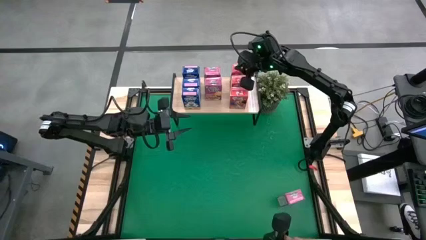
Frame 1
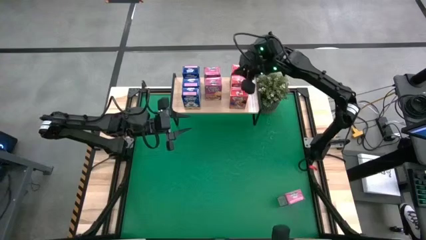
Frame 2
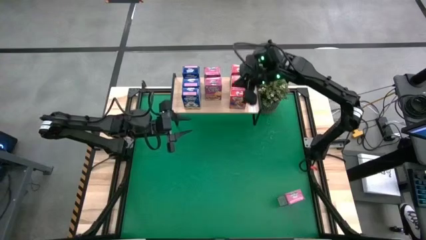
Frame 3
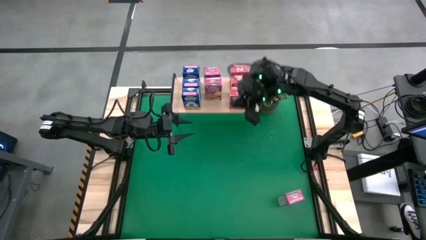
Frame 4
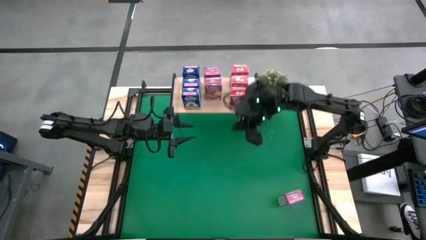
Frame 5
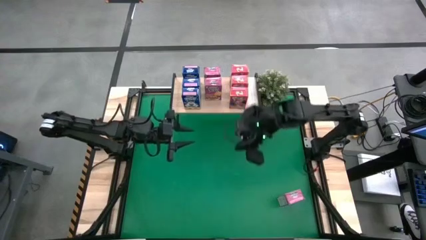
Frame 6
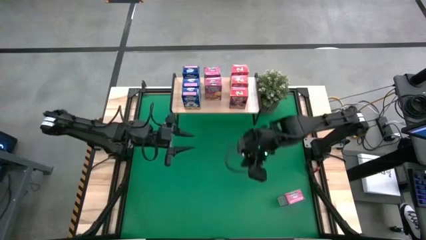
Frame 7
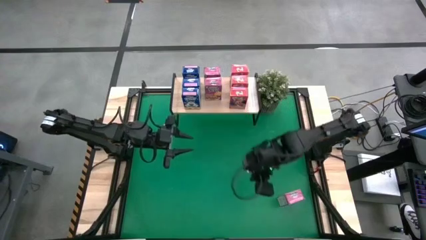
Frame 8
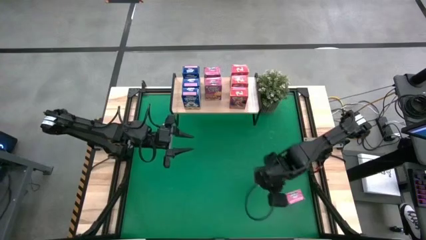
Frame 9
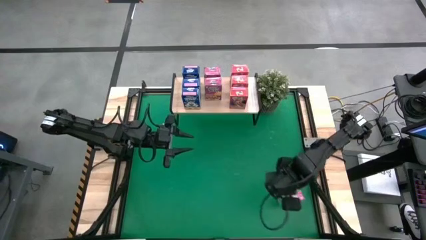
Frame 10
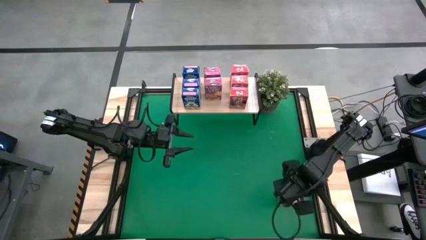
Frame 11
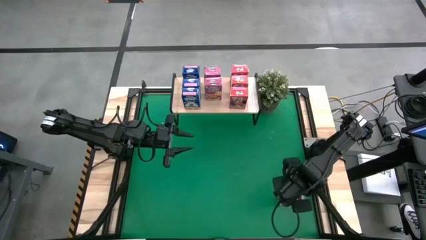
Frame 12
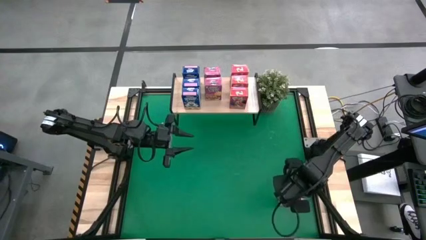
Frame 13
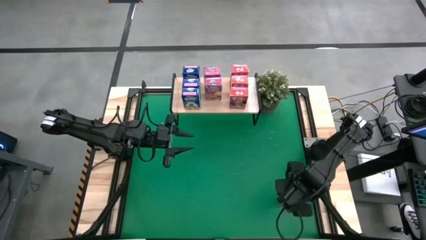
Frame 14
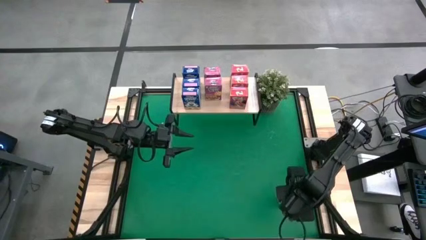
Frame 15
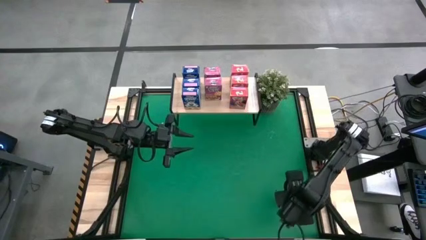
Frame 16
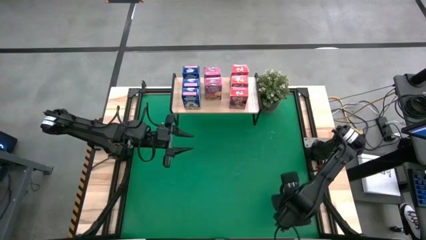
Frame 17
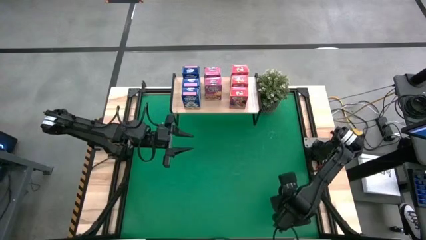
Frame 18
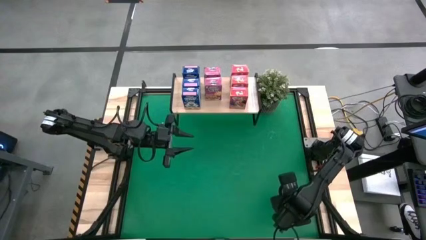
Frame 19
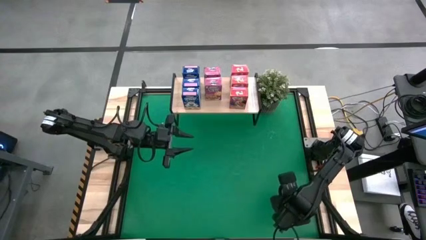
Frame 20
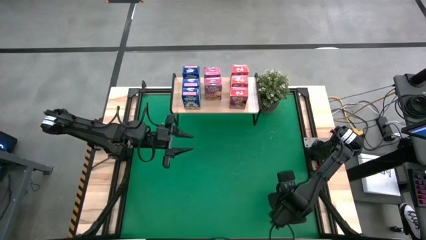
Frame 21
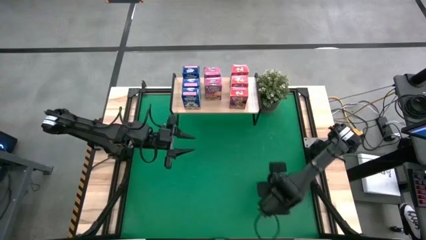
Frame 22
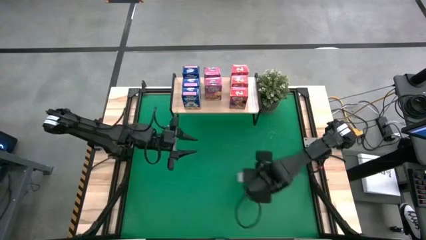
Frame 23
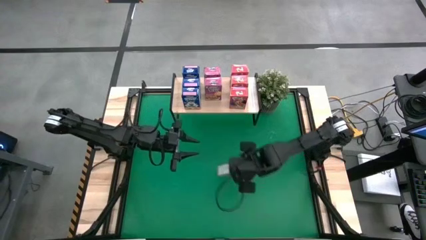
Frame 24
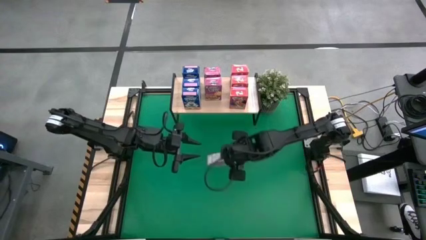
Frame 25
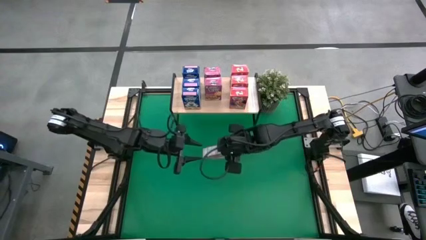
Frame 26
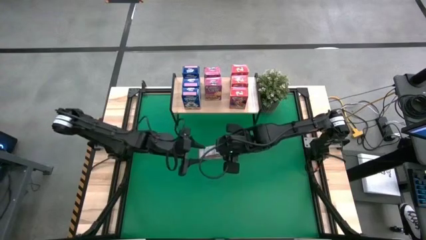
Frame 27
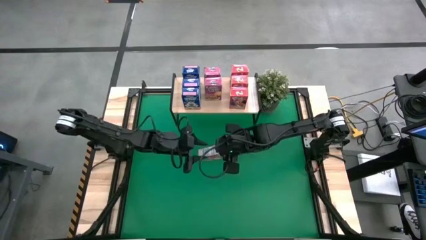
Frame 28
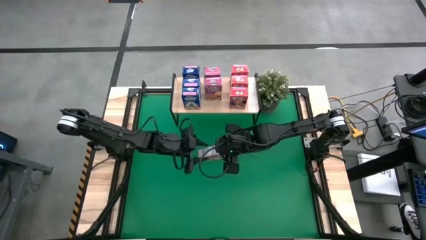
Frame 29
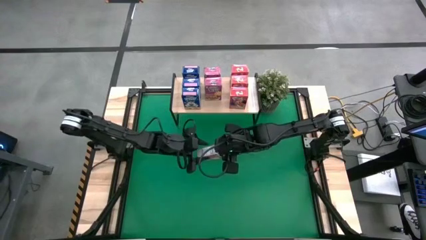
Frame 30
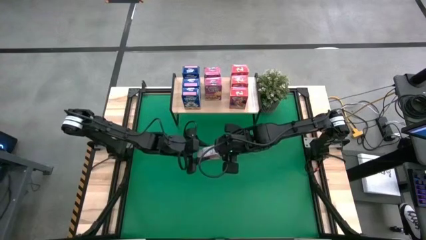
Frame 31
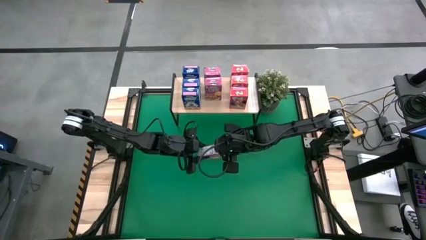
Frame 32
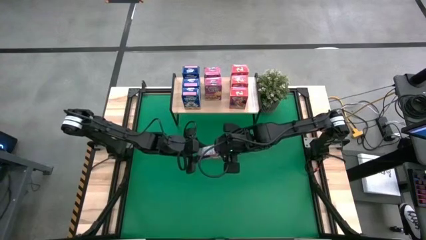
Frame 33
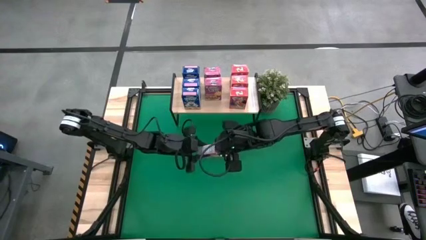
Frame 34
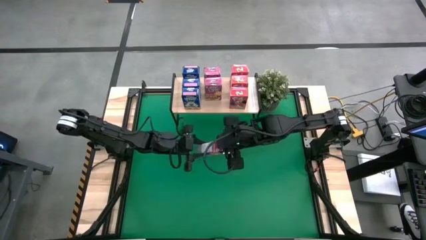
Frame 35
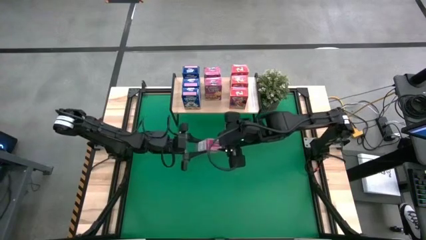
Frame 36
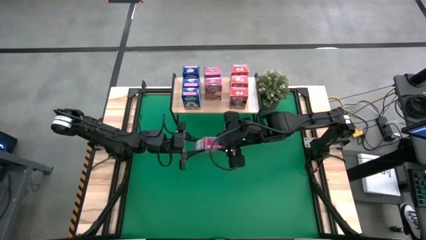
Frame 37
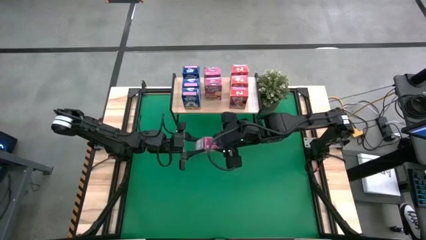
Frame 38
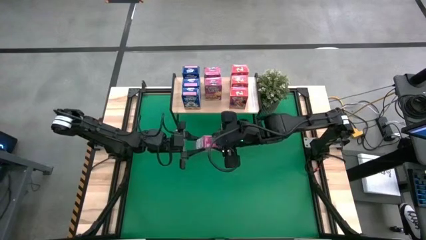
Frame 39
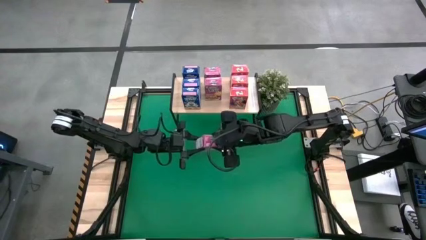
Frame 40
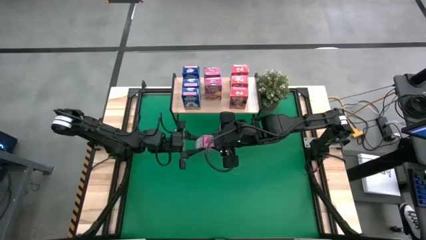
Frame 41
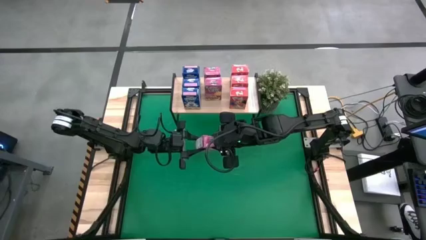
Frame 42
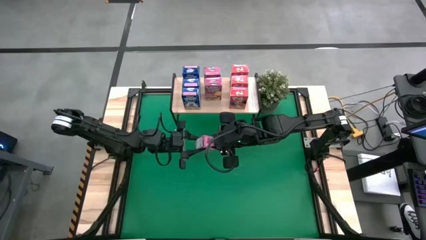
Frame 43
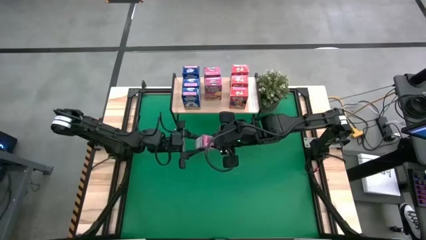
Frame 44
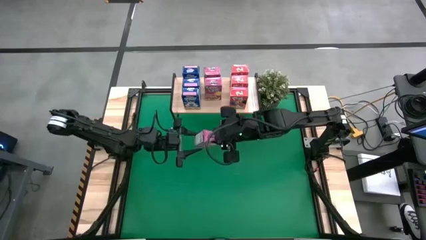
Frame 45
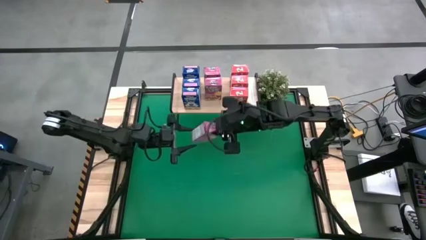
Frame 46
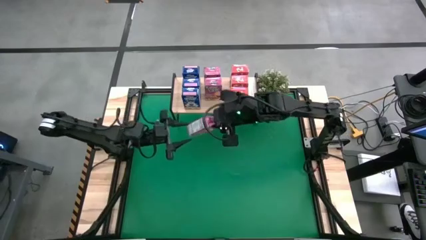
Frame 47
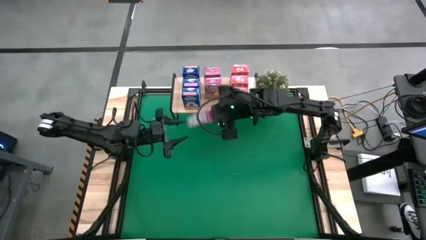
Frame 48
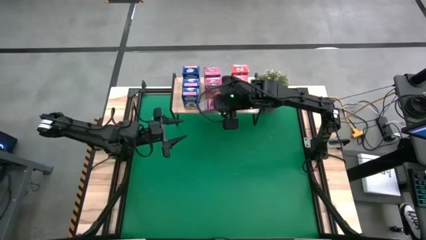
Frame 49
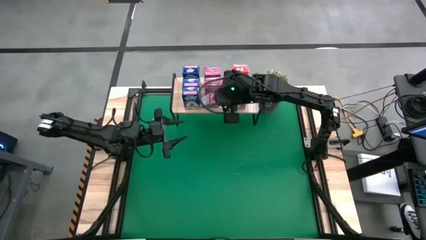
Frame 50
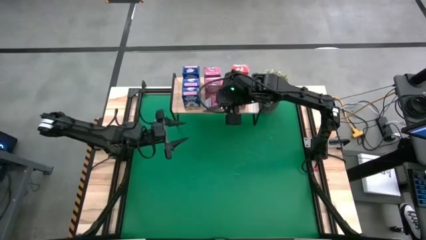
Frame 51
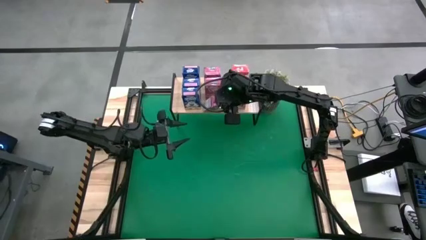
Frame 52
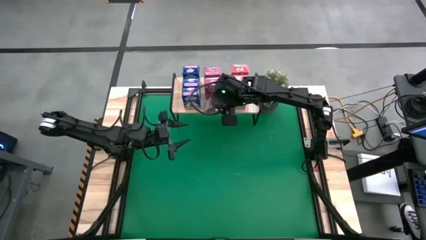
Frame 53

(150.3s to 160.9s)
Task: Stack cereal on shelf
Put the violet cereal box on the shelf aligned with the violet cereal boxes

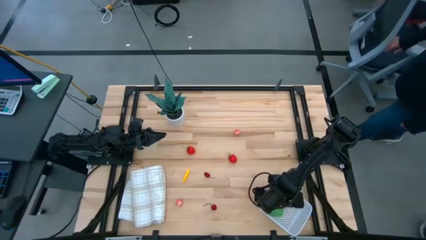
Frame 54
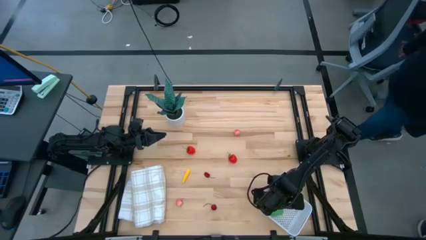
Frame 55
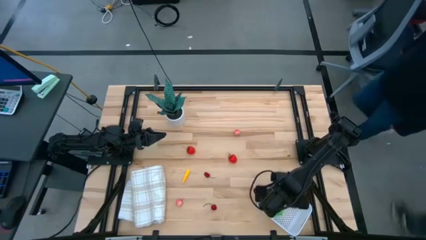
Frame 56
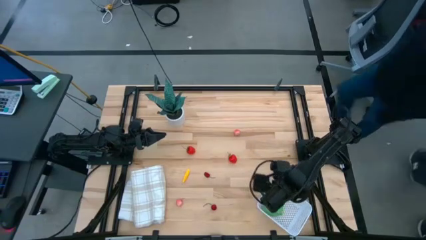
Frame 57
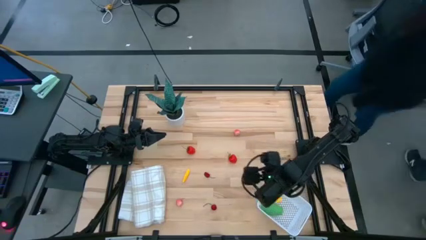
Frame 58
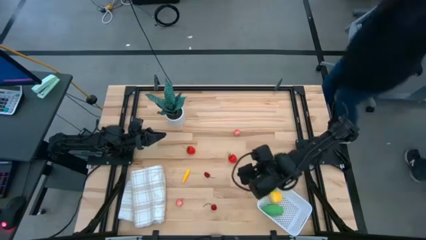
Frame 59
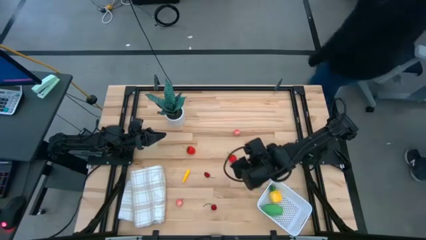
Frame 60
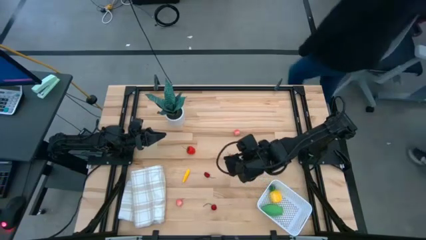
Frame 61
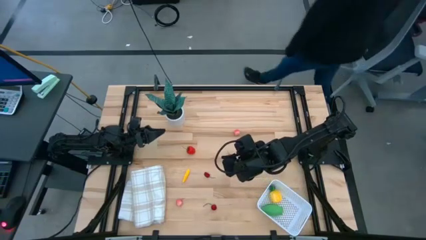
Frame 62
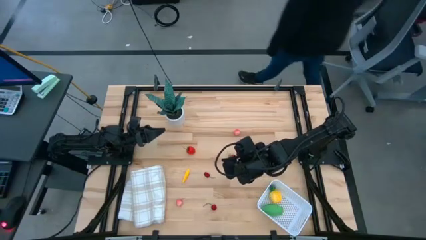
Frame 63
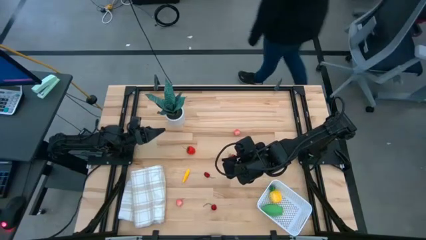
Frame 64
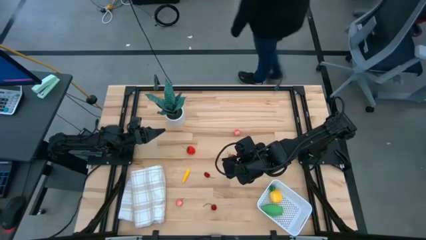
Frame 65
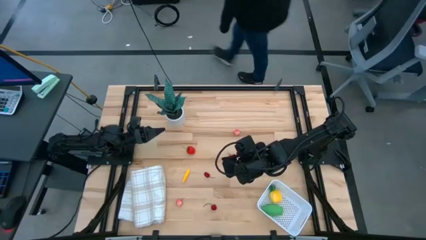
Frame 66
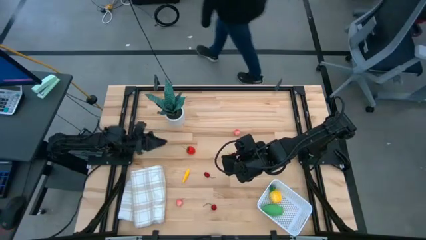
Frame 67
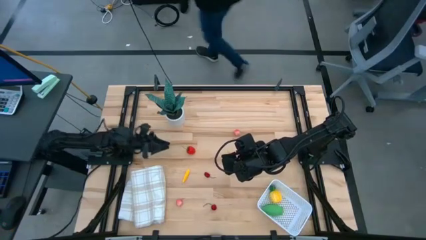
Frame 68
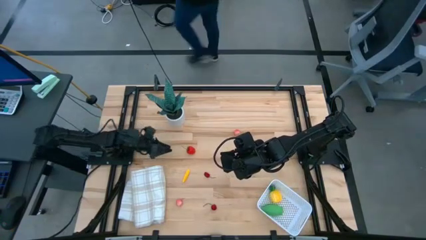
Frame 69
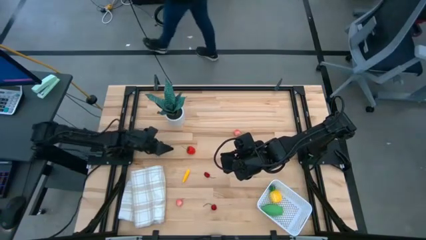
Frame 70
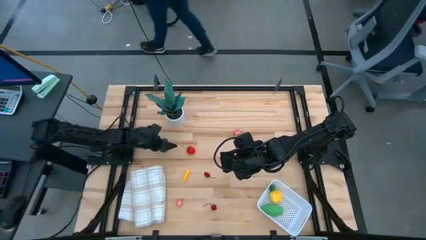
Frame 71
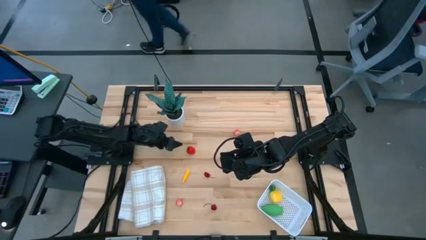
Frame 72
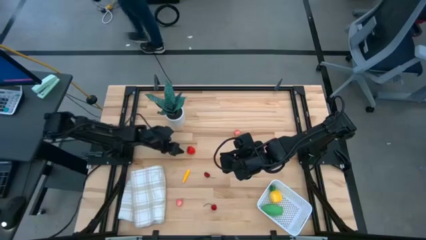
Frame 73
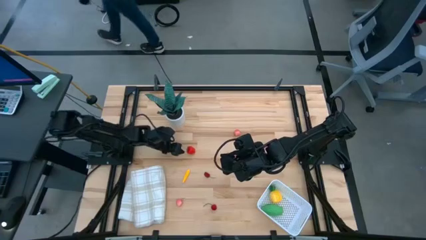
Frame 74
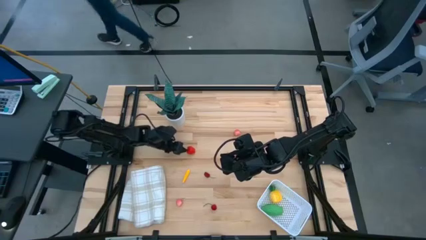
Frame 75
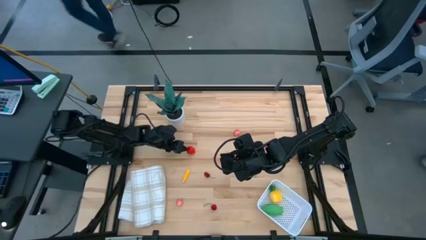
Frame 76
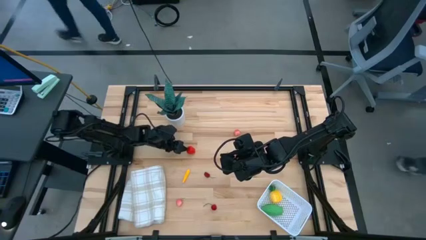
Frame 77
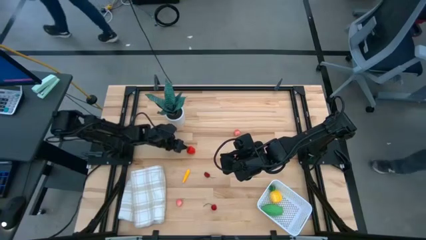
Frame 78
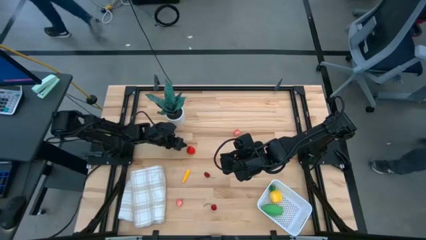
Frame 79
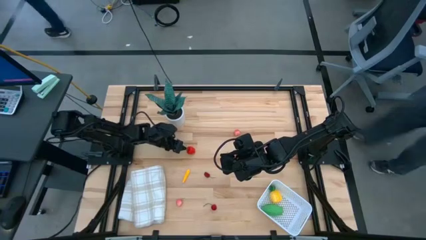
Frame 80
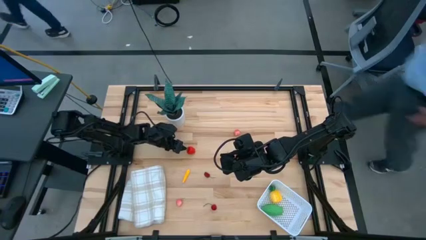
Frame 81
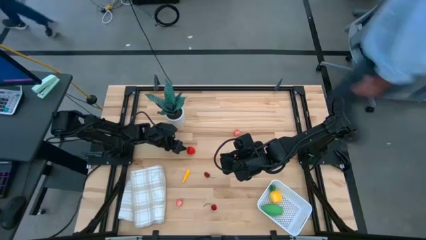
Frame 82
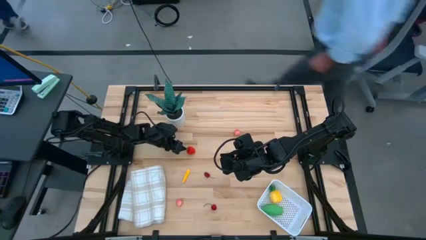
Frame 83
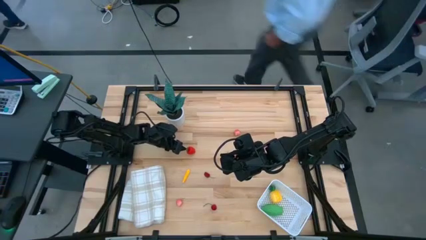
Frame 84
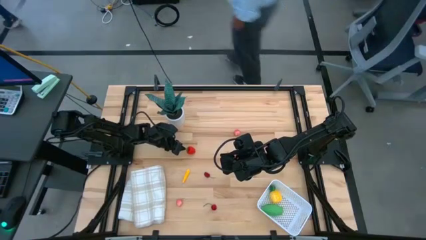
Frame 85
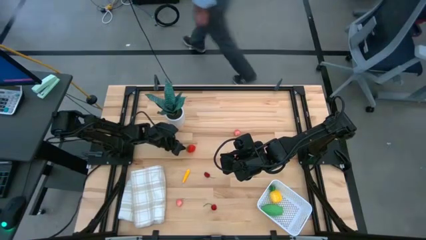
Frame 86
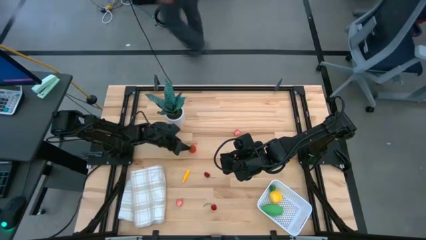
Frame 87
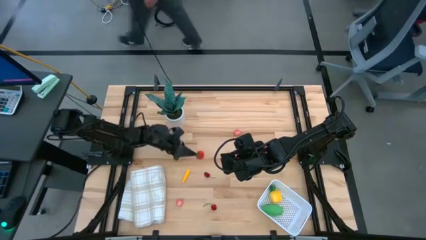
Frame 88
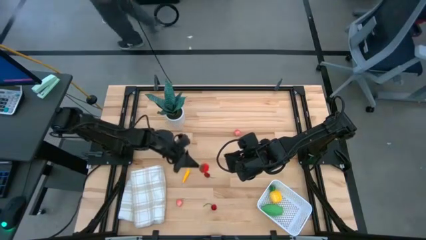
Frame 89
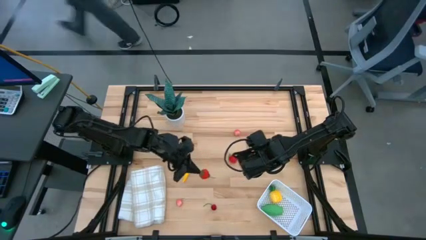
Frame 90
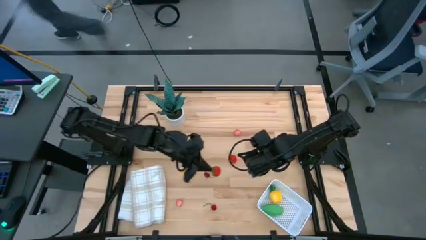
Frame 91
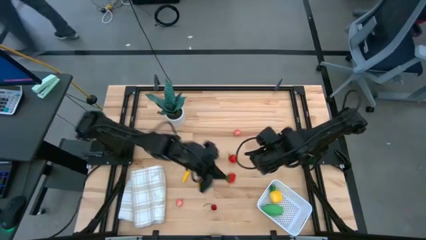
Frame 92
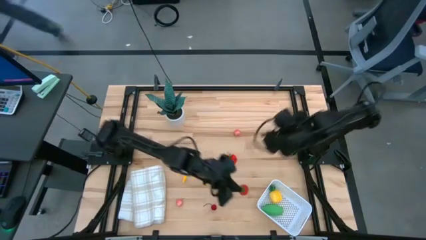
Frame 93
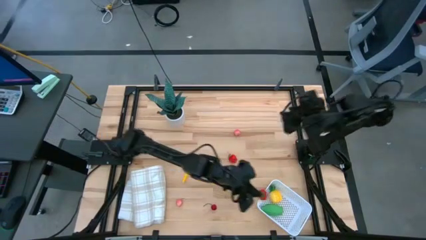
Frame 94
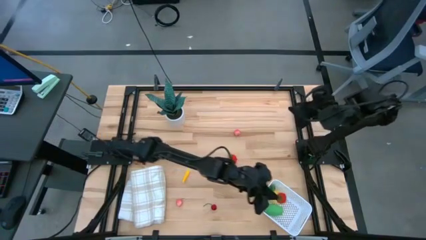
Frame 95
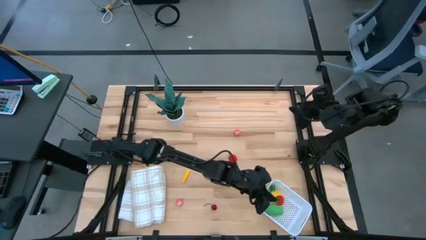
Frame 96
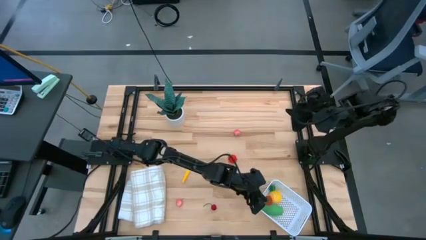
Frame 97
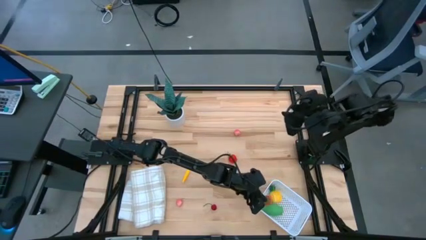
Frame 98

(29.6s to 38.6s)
Task: Pick and placing Produce into tupperware
Put the left red strawberry into the white bin
